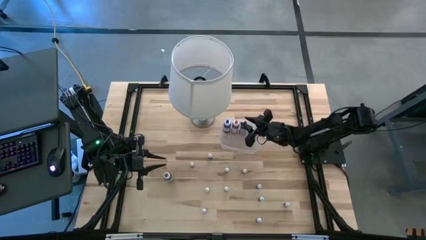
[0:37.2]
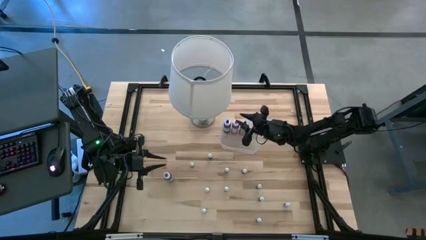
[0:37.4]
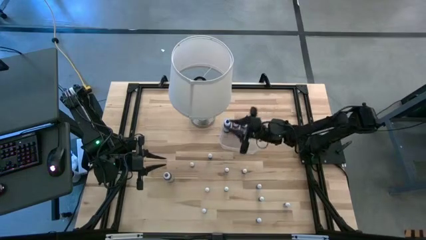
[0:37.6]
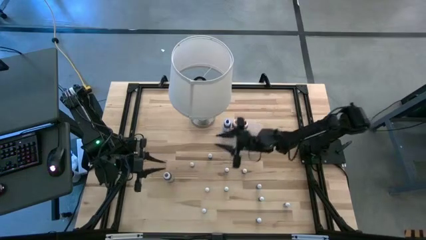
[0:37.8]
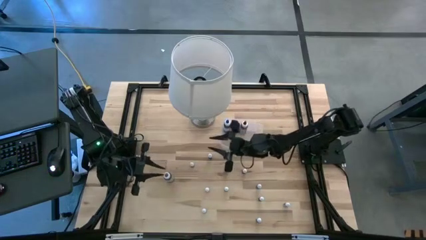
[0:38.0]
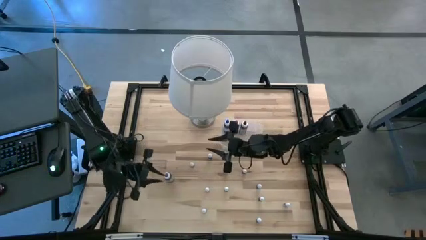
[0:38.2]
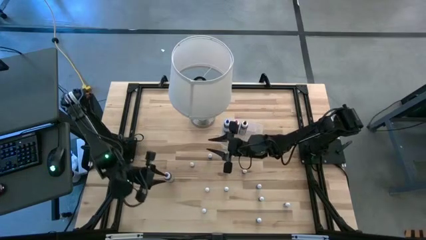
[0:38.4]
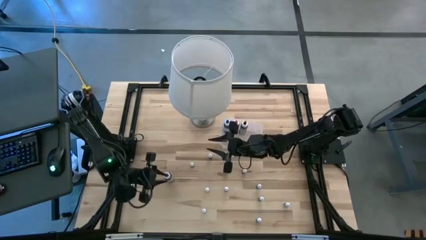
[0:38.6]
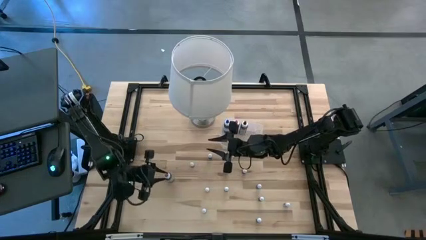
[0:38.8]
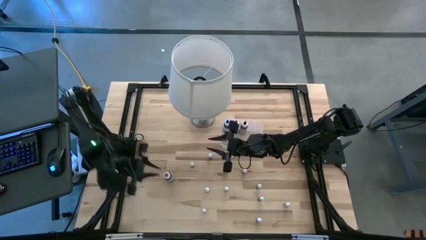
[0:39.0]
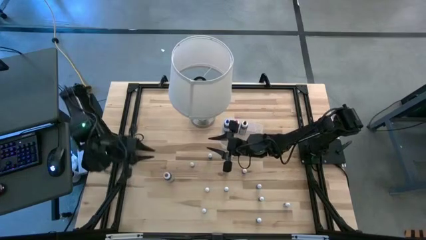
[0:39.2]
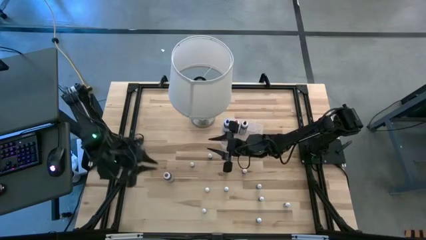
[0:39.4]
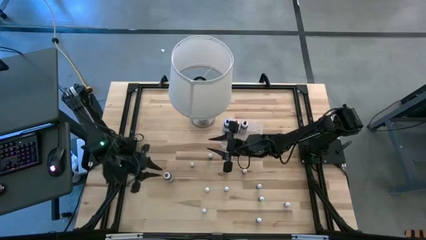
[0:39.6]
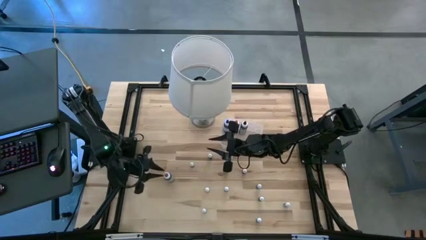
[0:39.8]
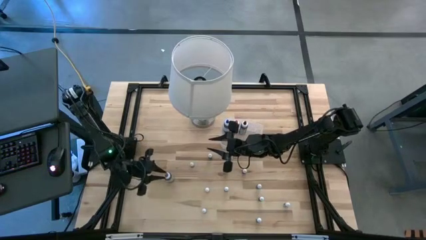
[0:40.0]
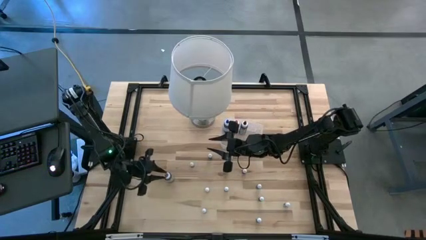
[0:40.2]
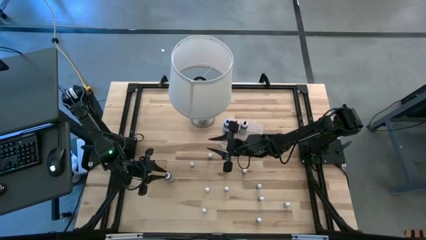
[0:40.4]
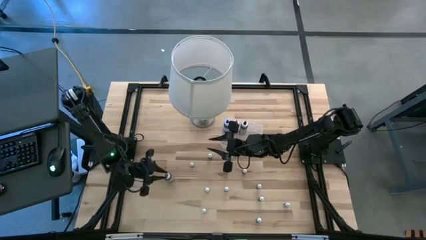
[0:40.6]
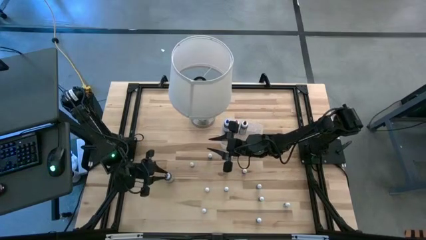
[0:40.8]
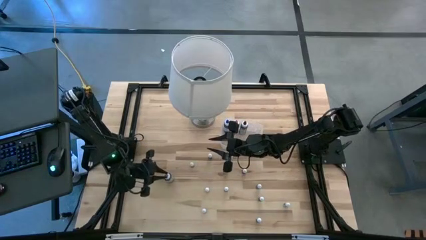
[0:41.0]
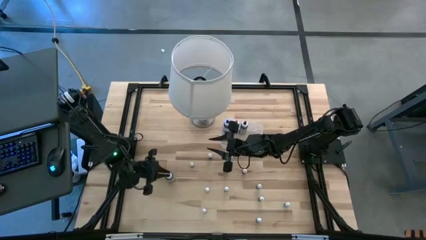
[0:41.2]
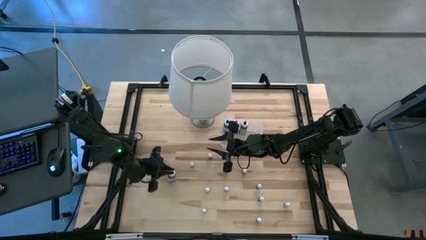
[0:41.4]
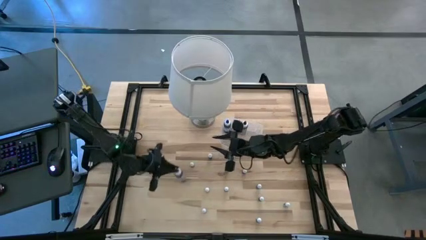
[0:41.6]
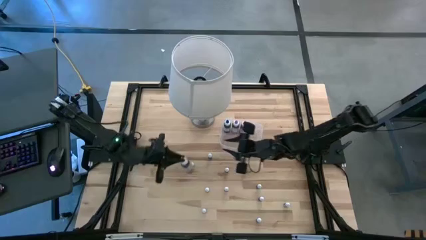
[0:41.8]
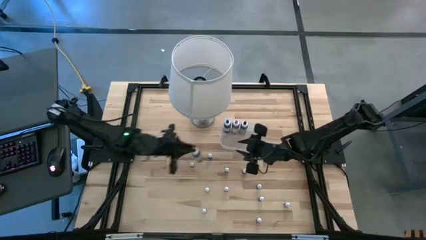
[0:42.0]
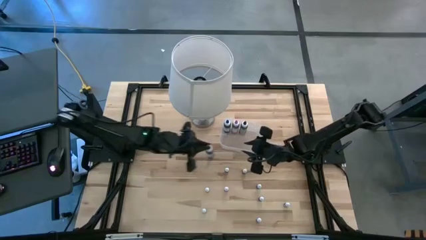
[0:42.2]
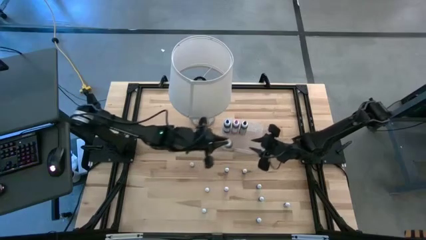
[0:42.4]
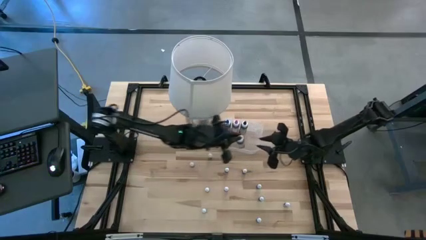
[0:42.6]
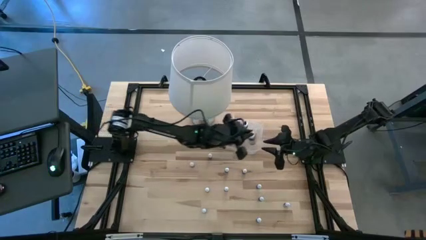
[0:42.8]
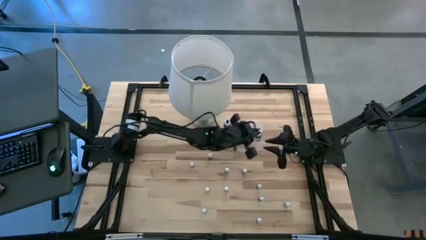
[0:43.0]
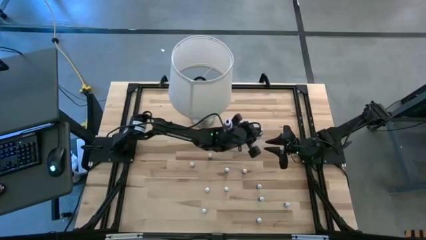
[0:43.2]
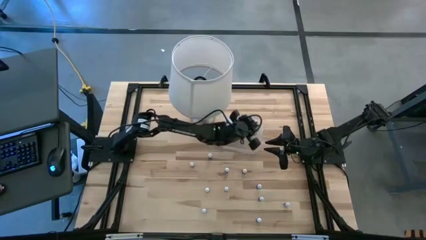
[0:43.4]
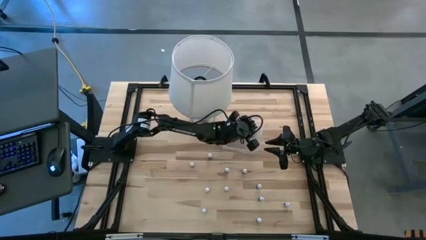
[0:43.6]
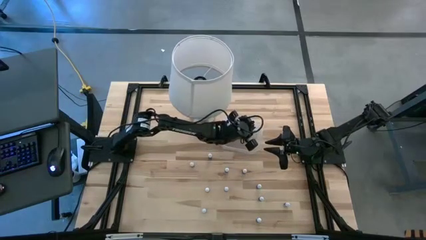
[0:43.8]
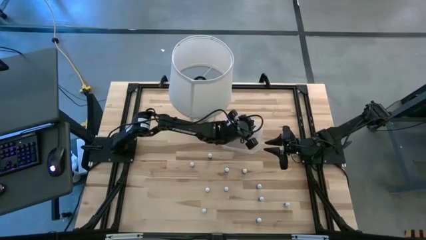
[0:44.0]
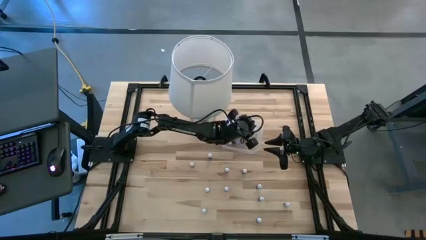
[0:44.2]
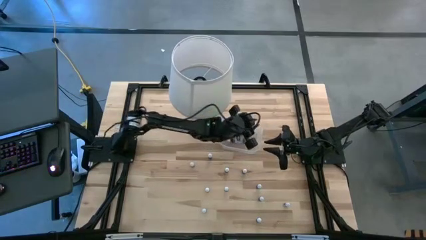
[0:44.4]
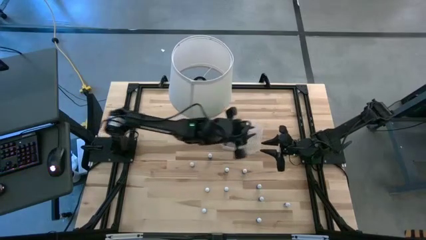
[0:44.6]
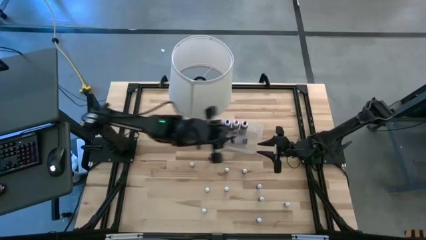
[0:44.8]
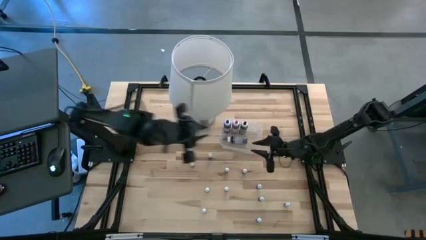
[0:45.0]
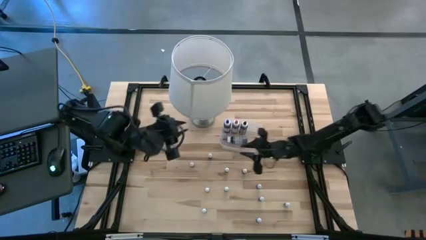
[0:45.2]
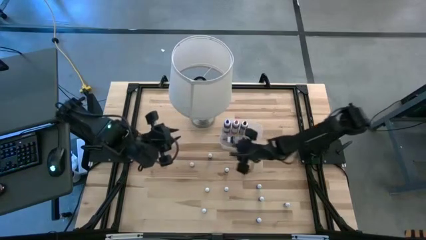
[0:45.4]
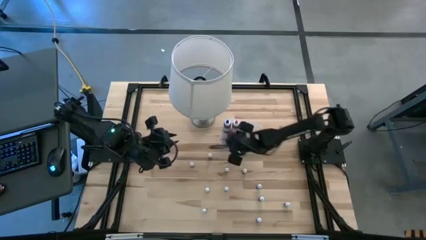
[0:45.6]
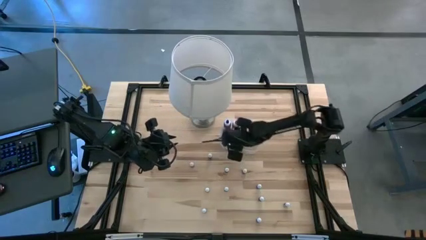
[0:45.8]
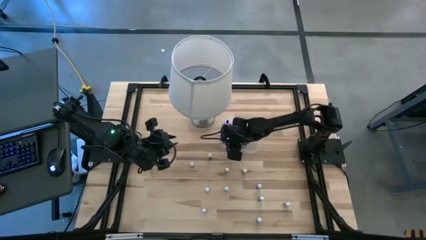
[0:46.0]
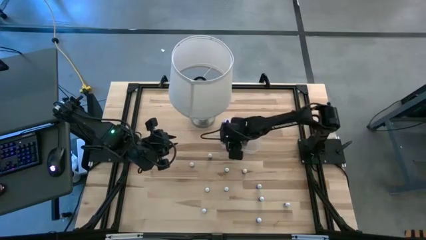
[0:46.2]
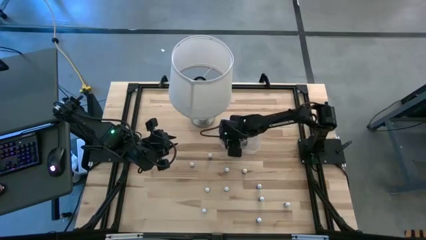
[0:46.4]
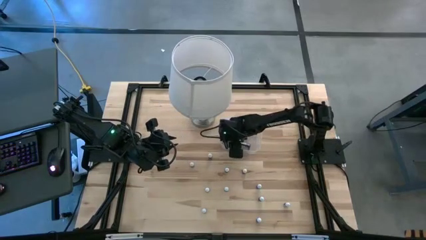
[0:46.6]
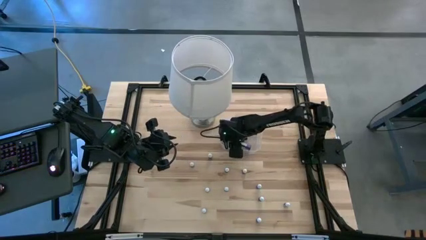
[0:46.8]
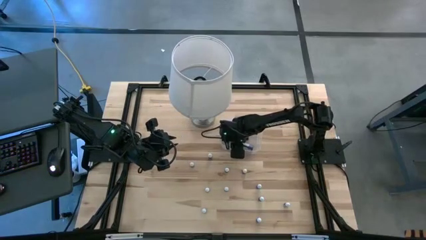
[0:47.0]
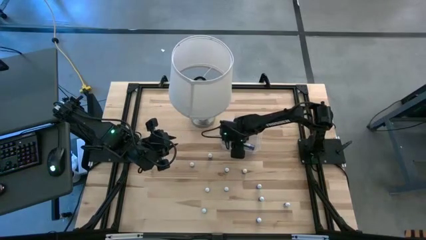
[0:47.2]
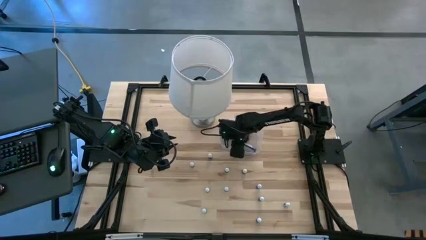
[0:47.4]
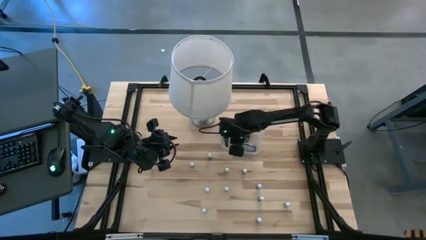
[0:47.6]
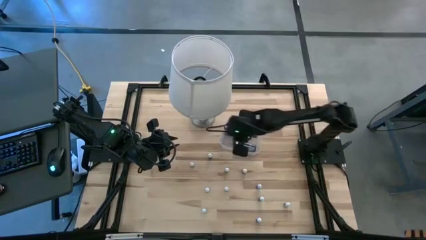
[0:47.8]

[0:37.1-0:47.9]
Task: Pick & Place food coloring
Put the large violet food coloring bottle into the transparent bin

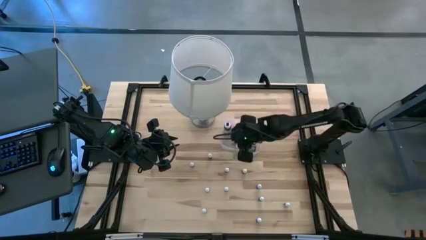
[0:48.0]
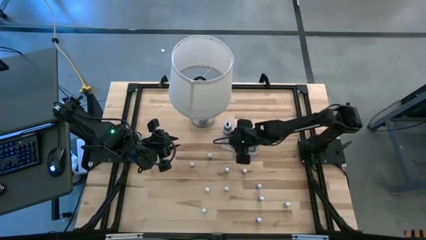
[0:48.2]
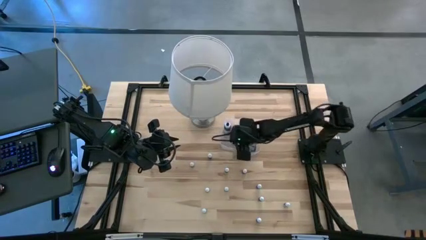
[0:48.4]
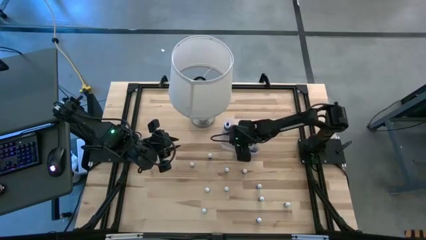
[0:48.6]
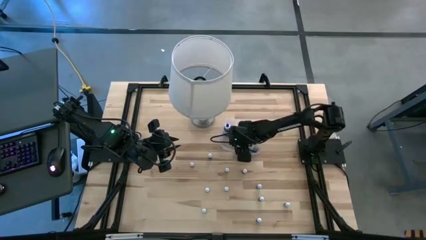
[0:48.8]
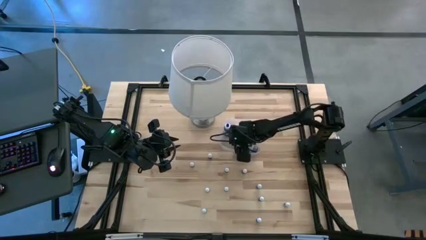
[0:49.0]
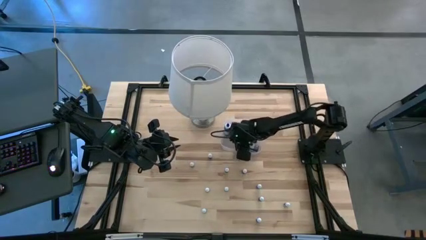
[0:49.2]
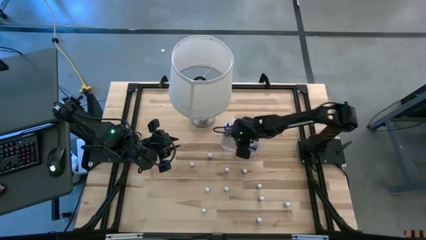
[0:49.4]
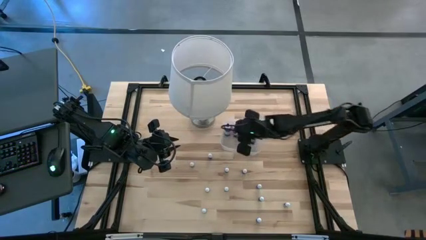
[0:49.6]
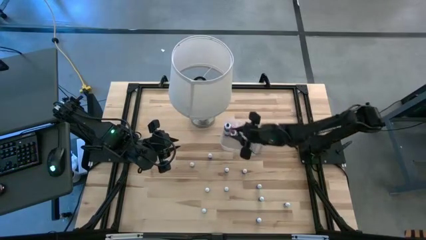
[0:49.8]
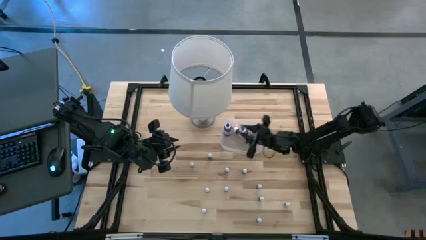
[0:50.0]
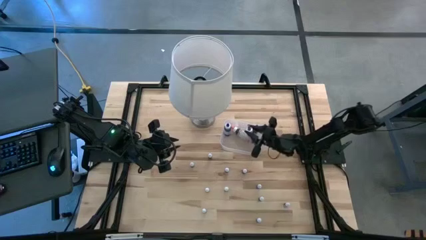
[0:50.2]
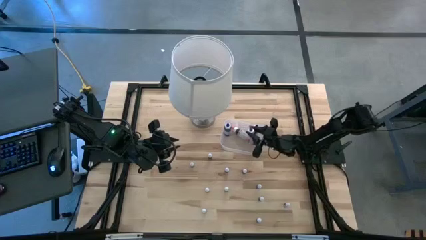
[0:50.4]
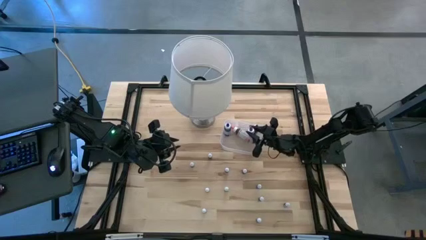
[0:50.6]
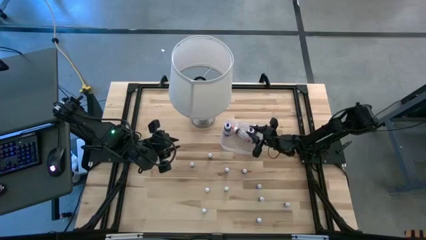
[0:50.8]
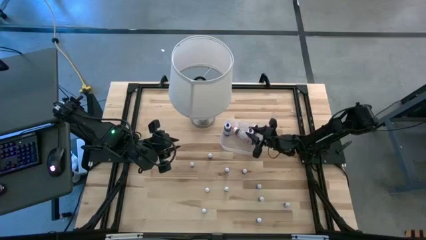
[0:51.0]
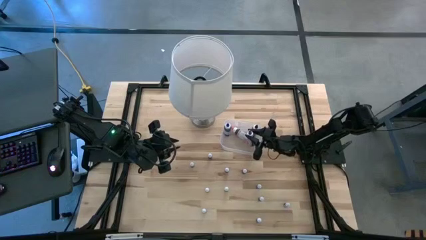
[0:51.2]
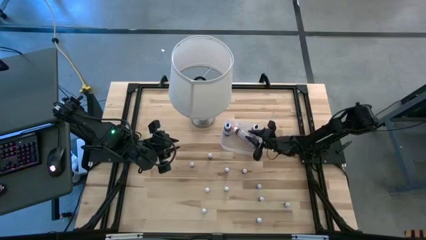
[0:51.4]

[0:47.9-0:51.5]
Put the large violet food coloring bottle into the transparent bin
